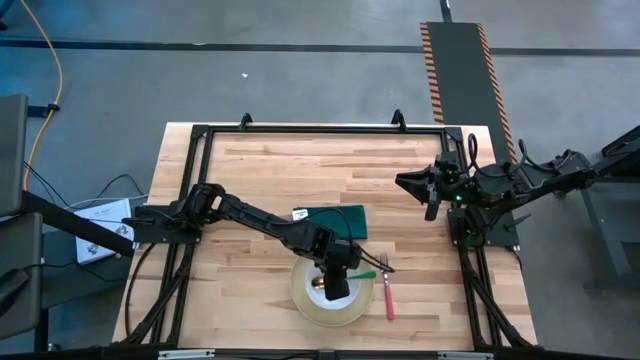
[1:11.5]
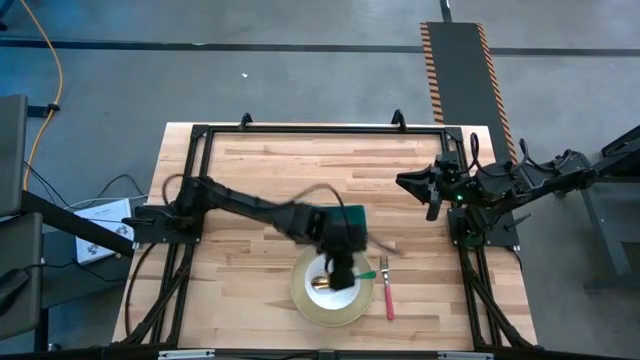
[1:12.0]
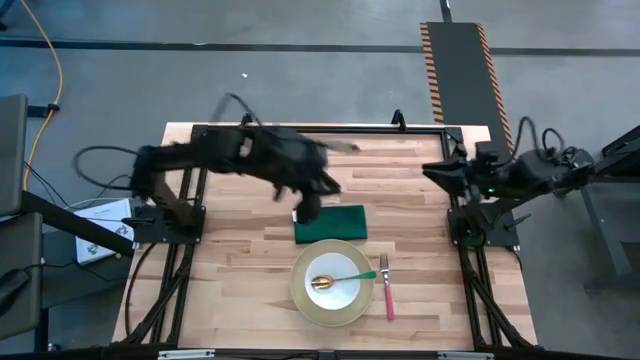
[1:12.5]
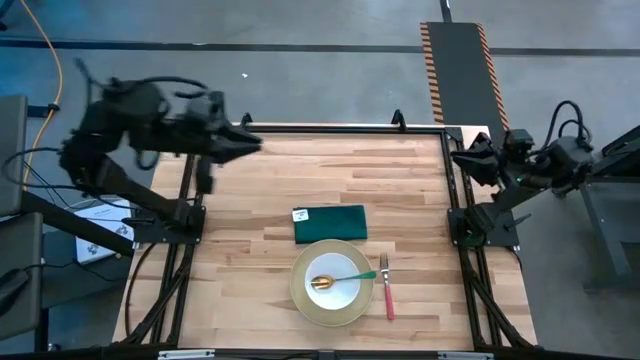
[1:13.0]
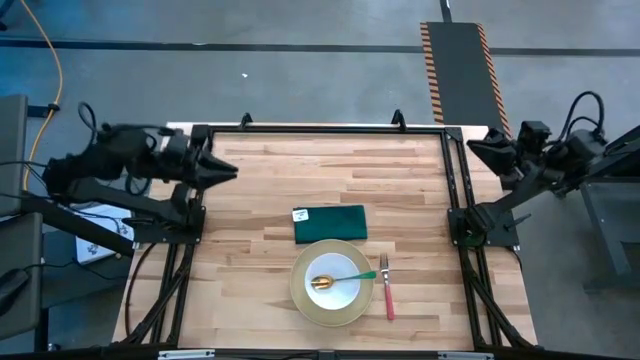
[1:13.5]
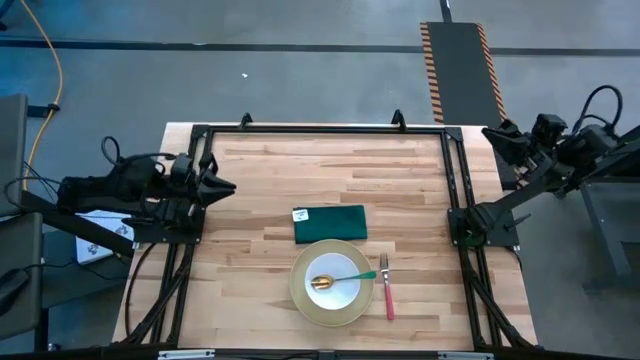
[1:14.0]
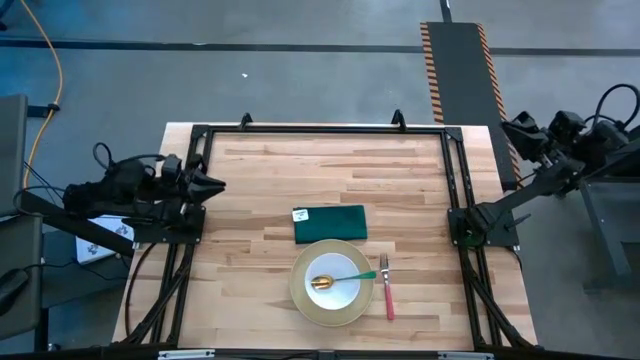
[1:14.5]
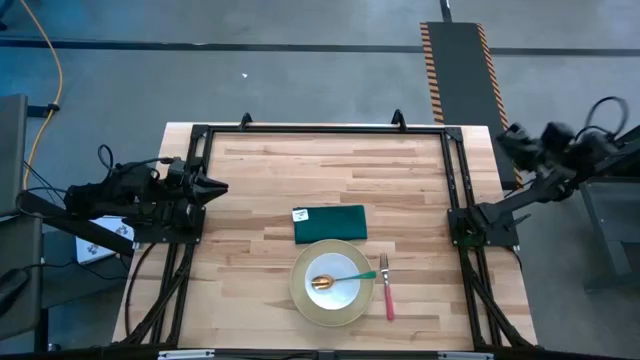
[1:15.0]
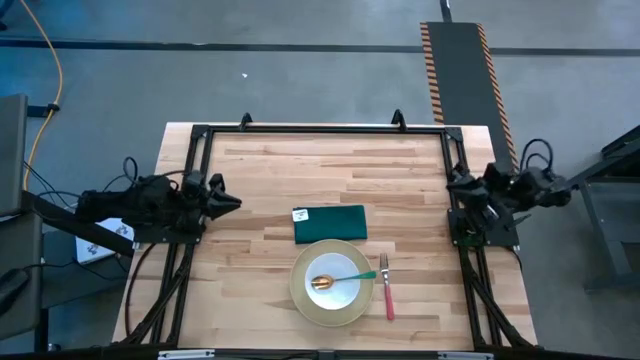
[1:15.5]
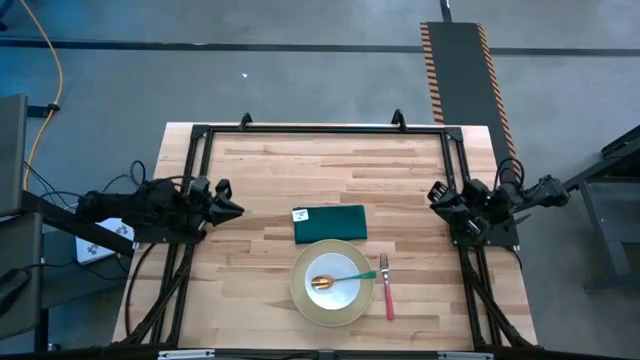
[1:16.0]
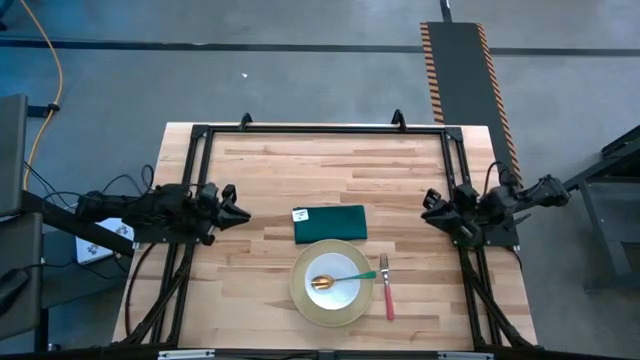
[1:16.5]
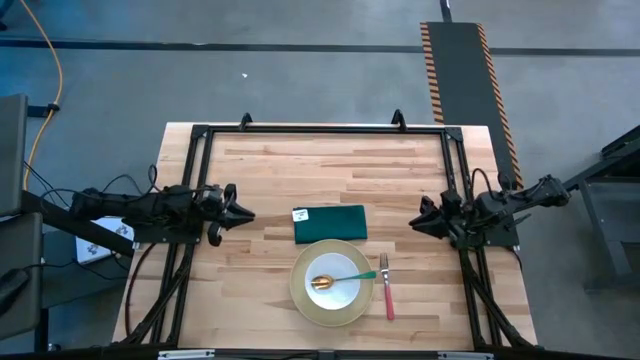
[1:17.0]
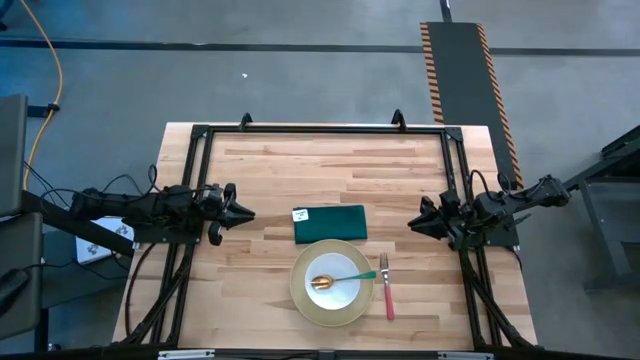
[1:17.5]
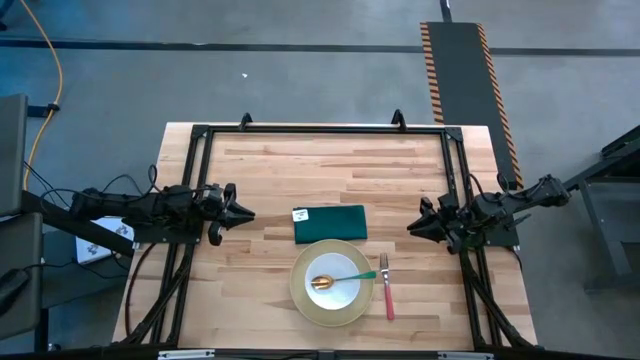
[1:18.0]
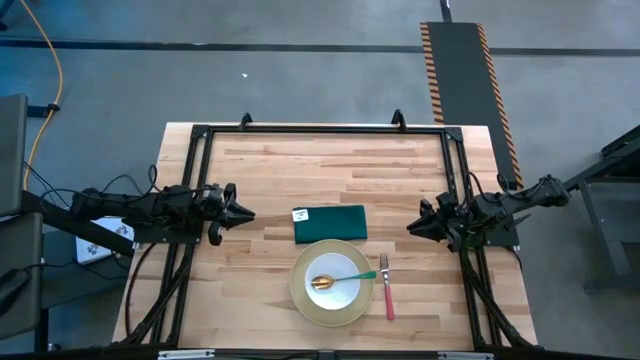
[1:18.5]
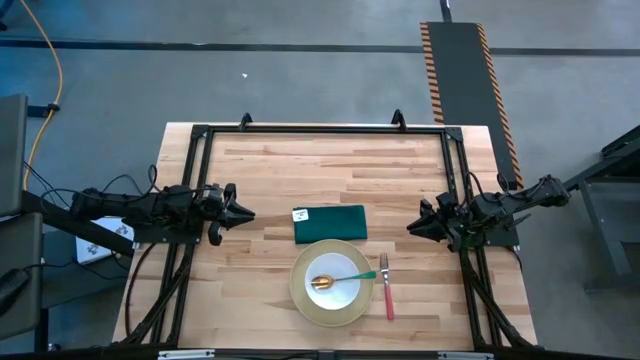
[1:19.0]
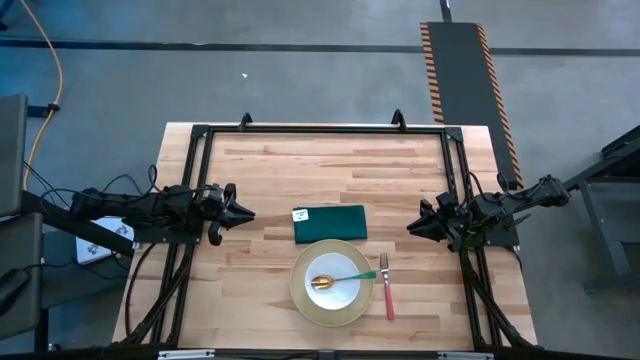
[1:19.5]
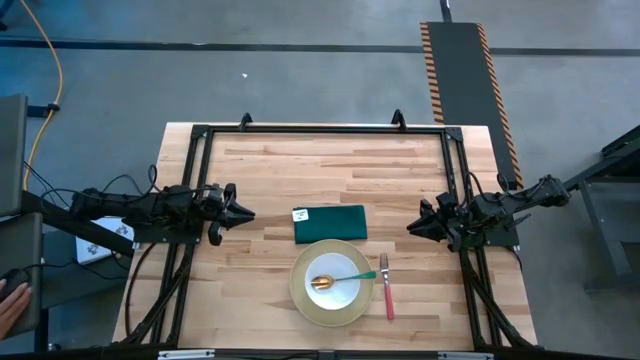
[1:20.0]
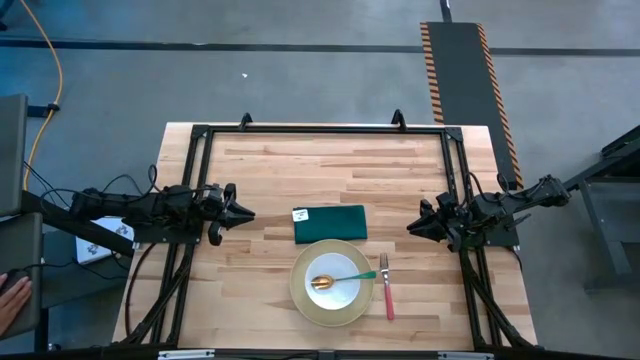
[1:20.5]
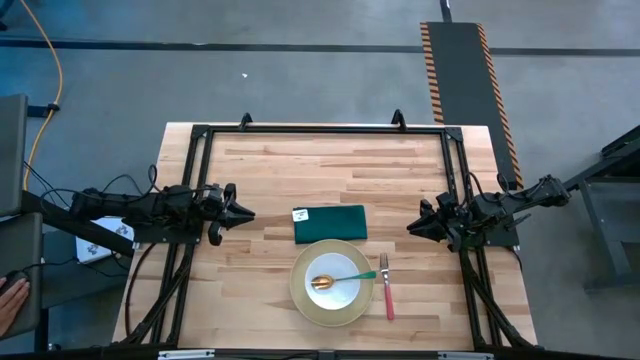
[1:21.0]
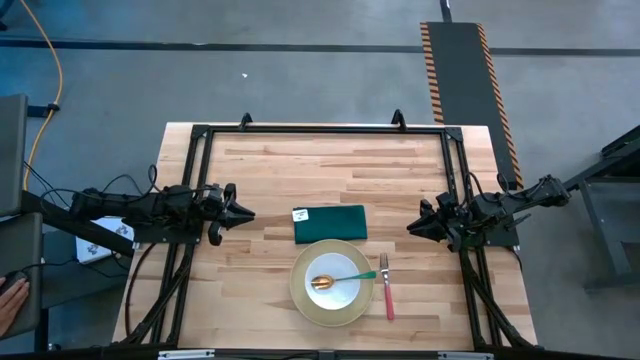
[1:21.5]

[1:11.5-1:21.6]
Task: Set table place
Return to Home Position

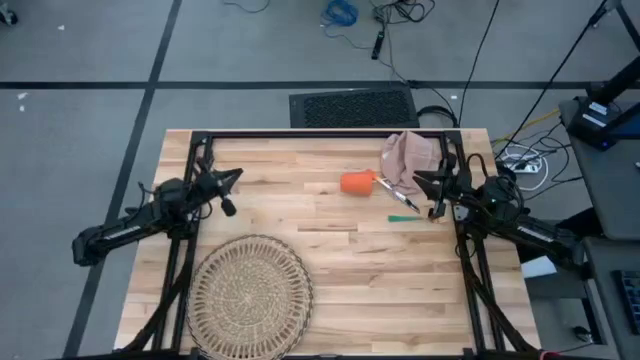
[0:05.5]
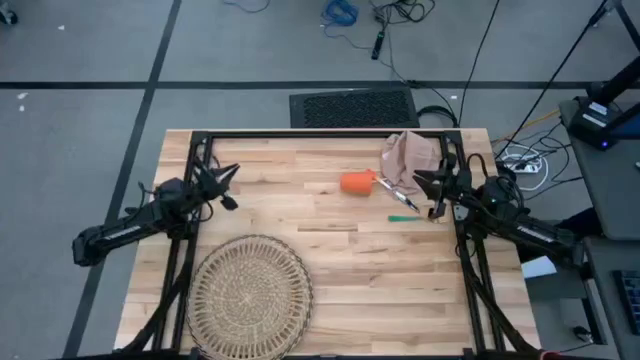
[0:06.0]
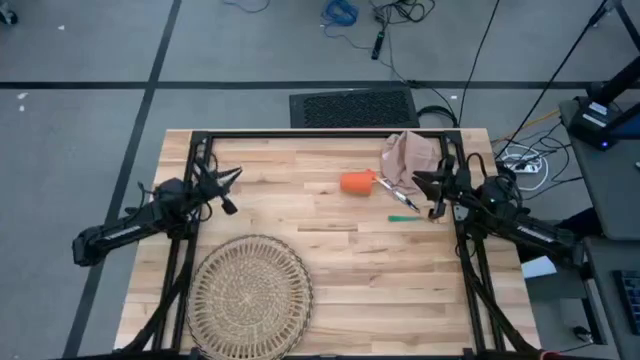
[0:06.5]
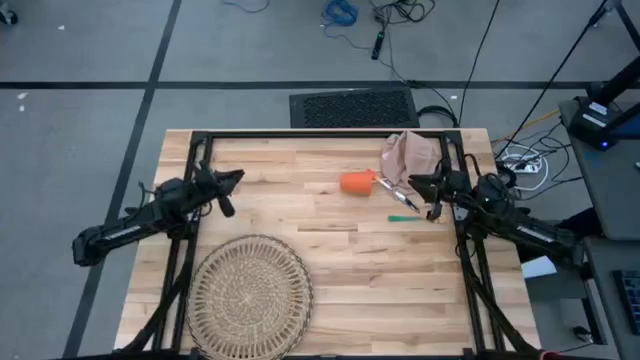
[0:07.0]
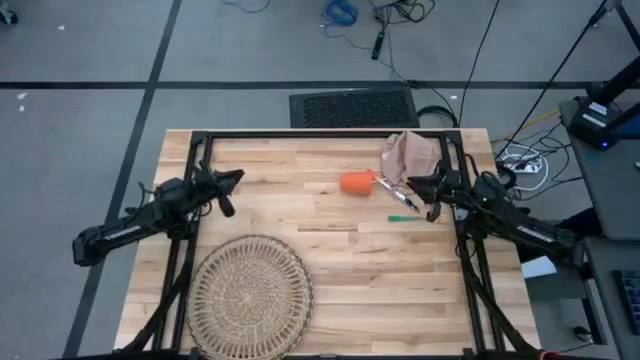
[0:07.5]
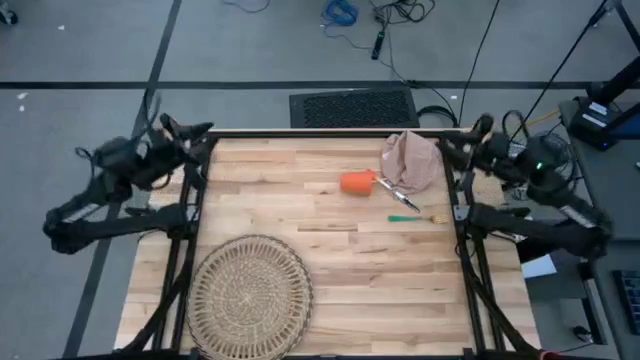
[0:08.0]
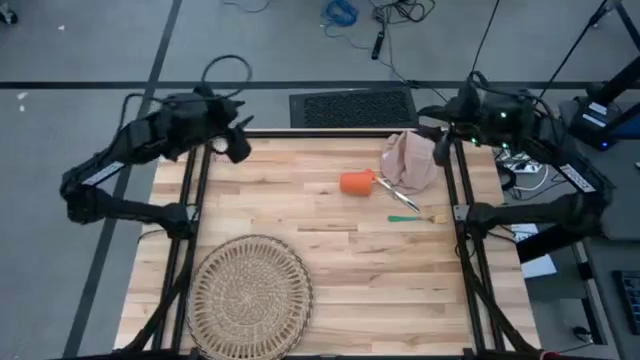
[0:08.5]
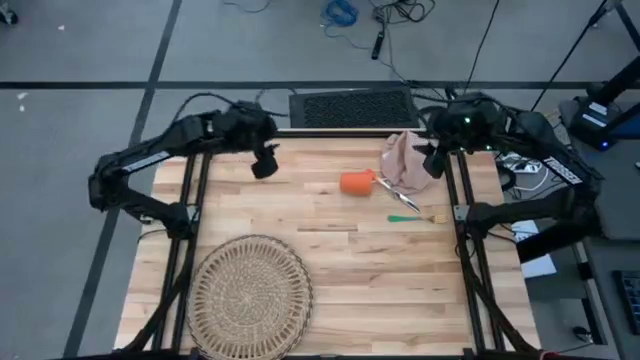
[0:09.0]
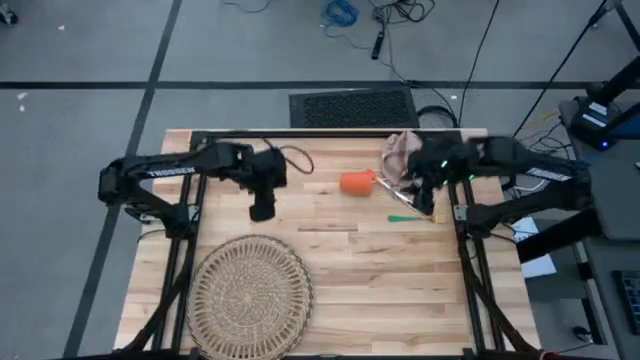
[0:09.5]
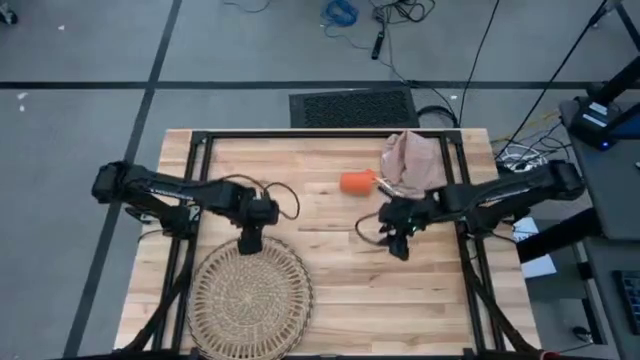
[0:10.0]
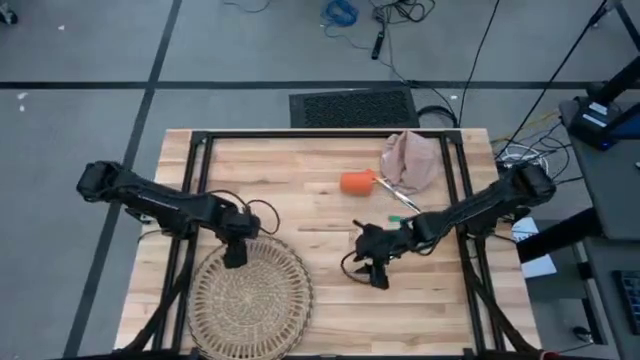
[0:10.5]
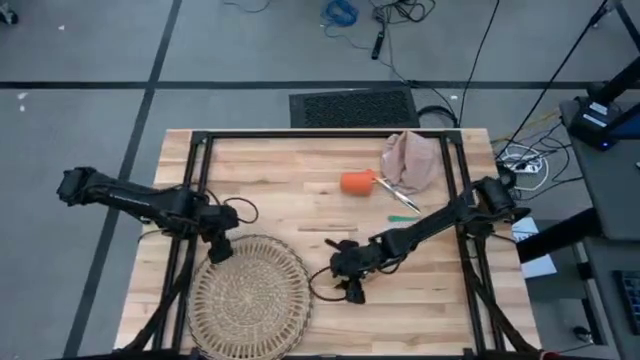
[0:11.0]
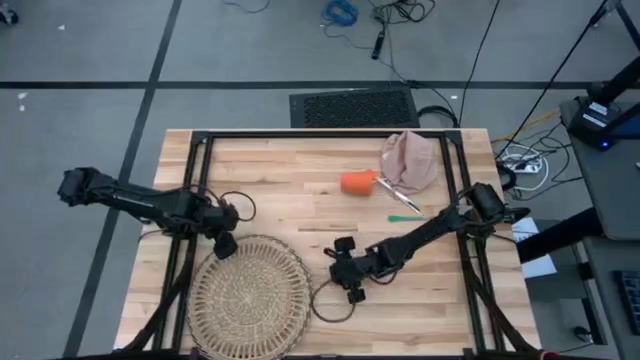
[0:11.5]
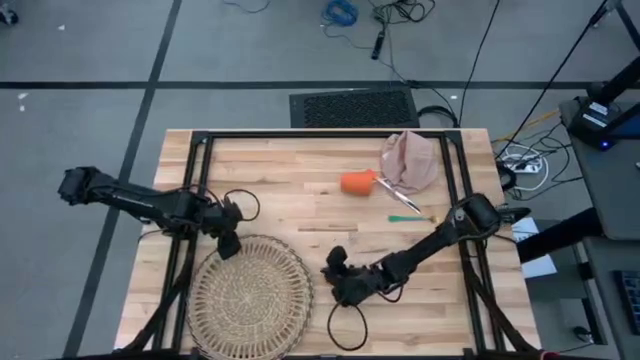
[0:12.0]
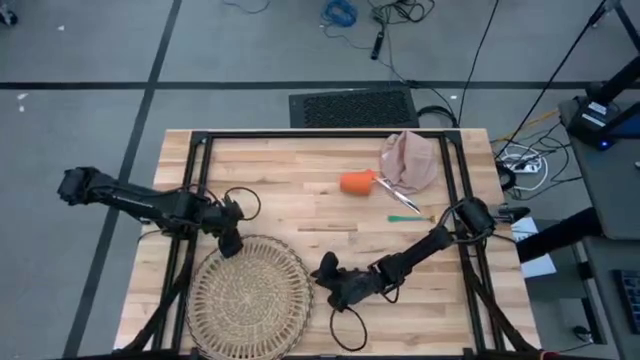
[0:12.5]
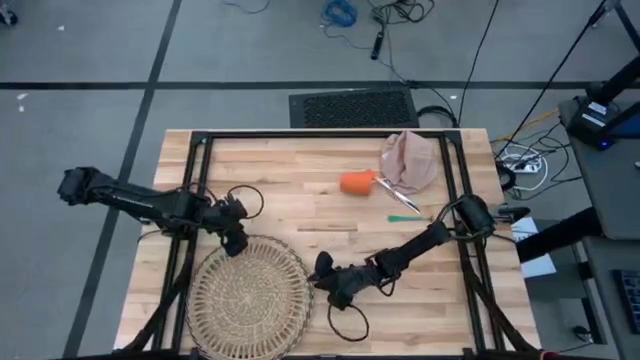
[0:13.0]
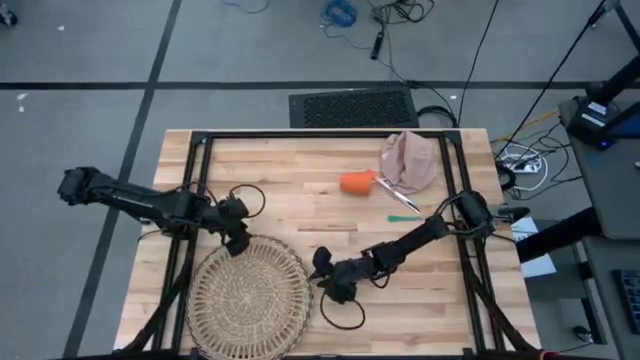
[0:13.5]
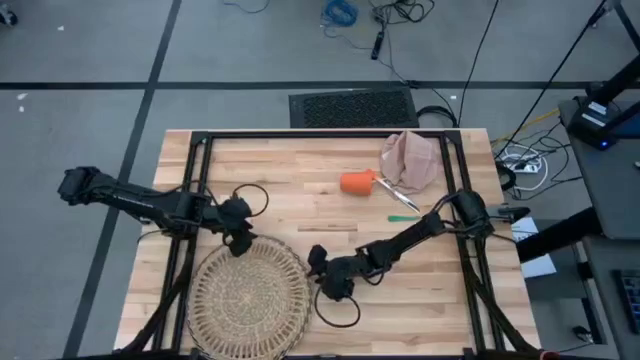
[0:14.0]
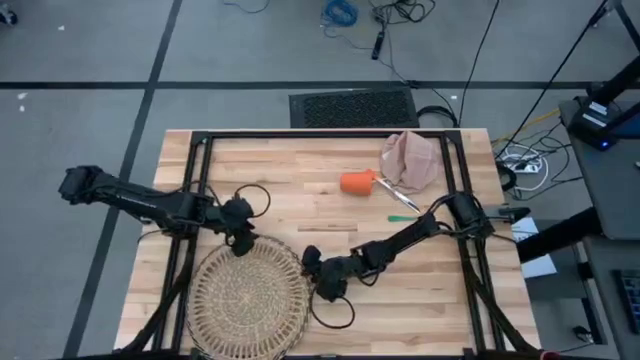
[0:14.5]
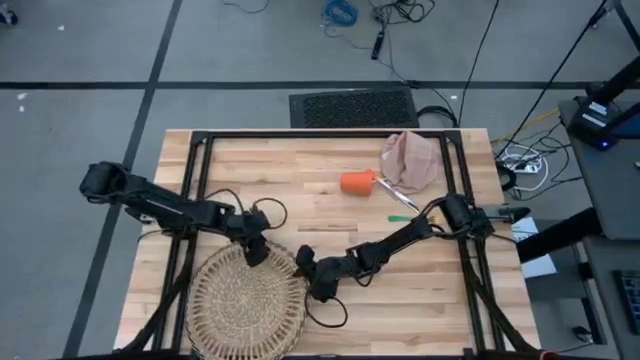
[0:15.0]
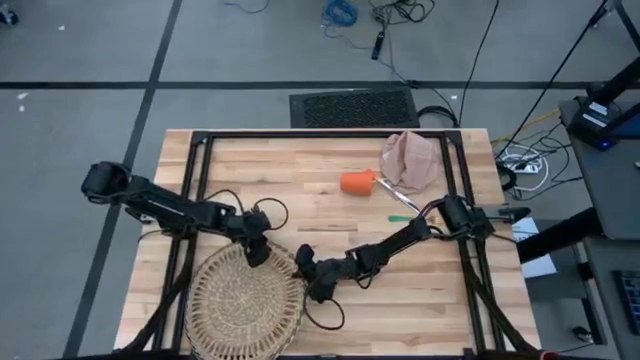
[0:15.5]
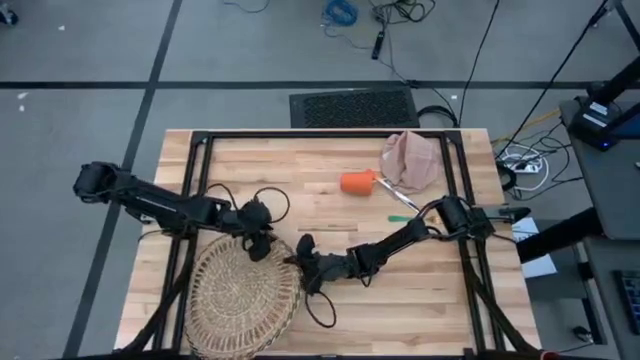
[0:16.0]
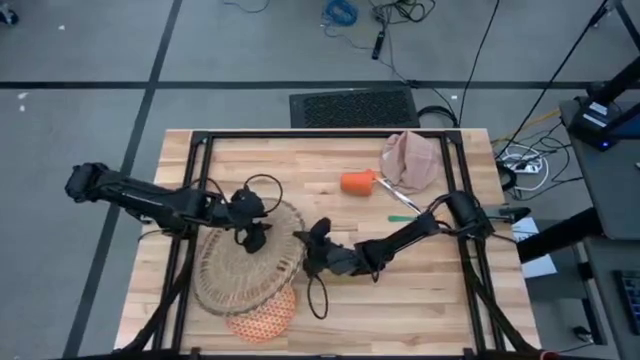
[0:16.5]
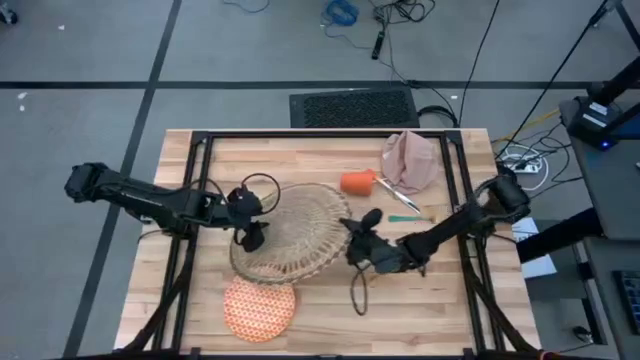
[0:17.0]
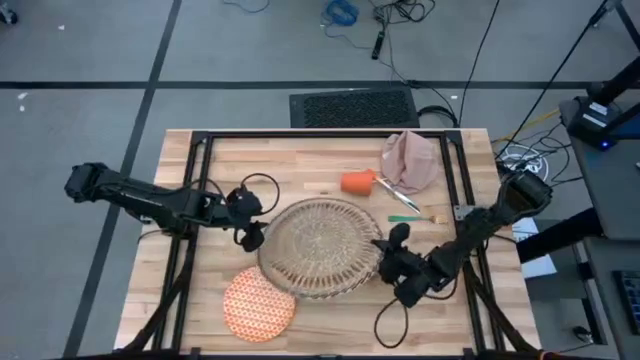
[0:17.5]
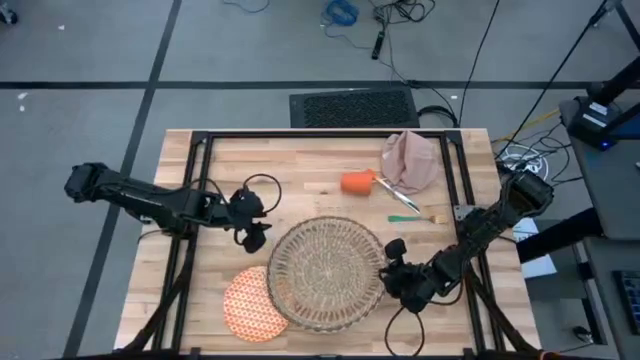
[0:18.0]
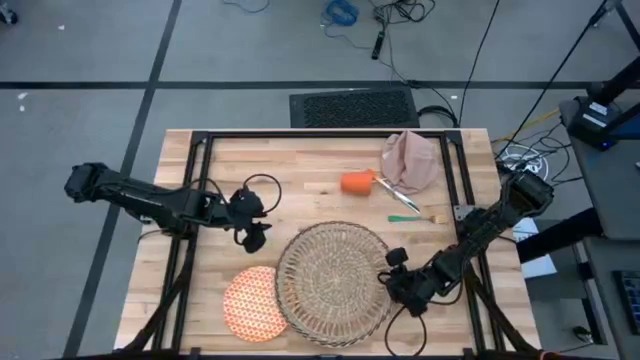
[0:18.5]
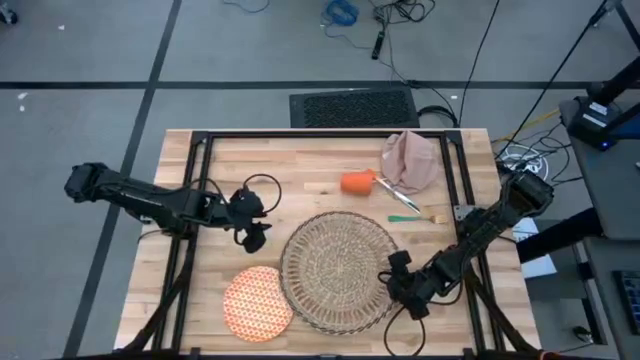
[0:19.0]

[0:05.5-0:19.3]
Task: Set table place
Prepare the brown mat
